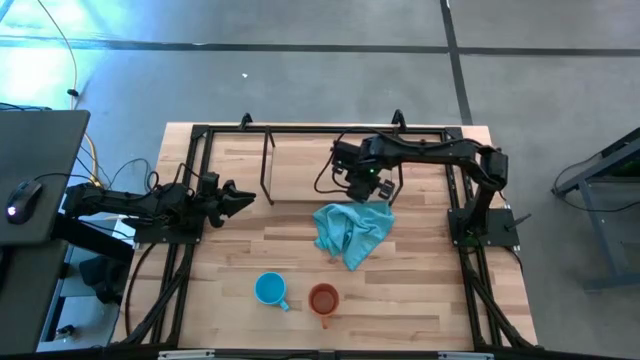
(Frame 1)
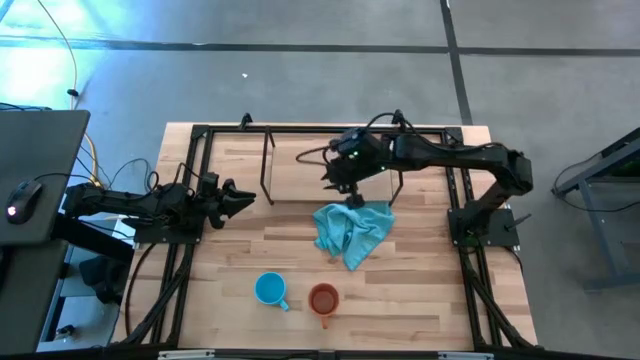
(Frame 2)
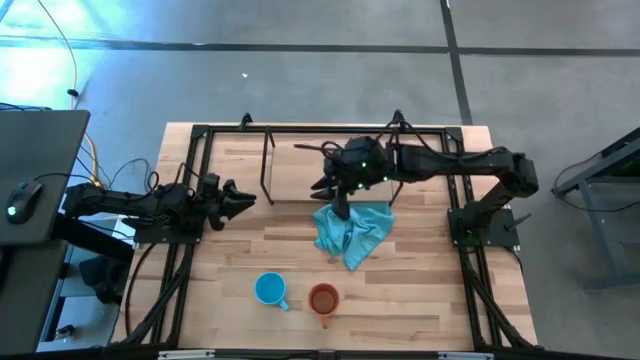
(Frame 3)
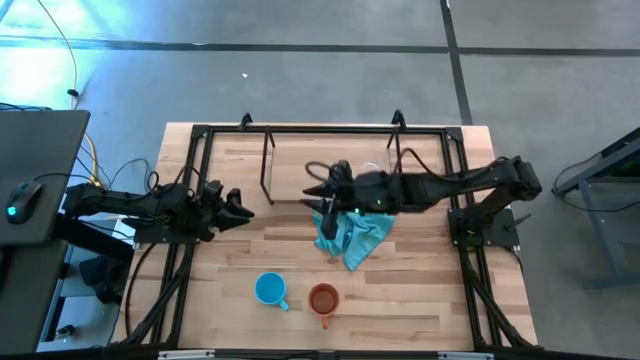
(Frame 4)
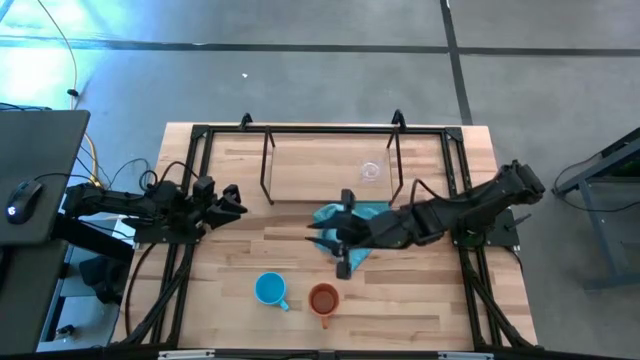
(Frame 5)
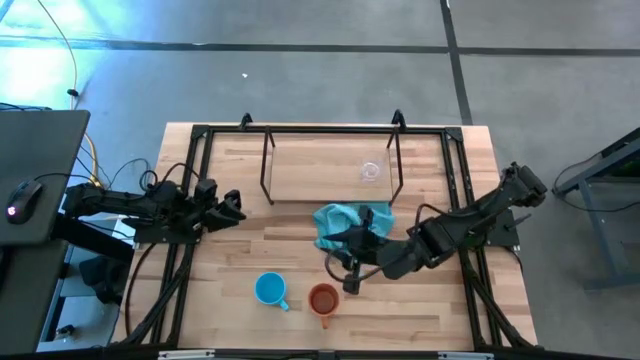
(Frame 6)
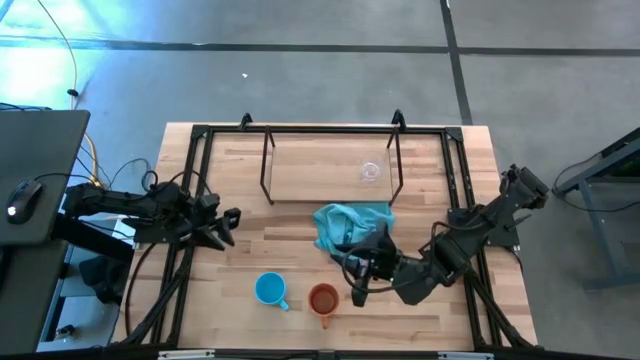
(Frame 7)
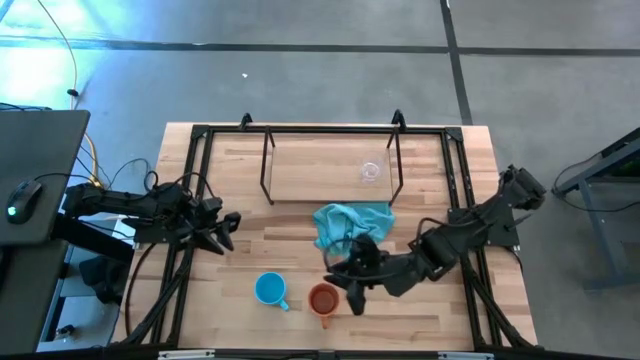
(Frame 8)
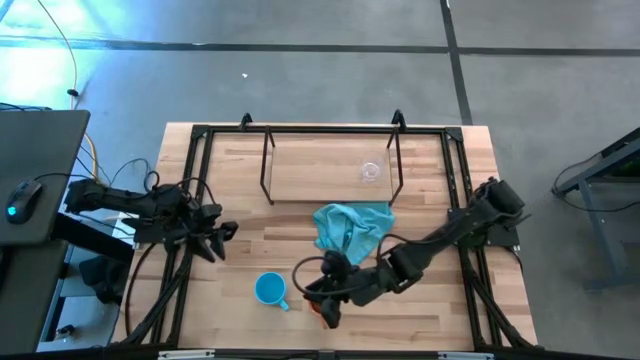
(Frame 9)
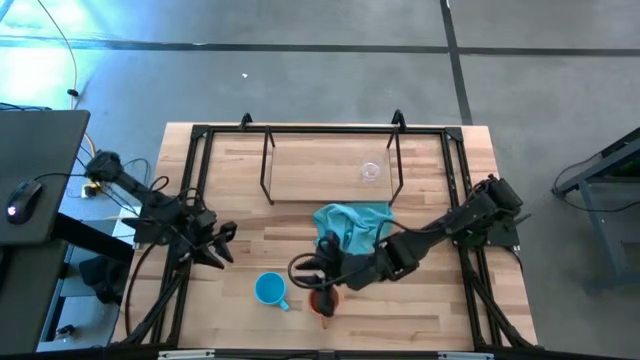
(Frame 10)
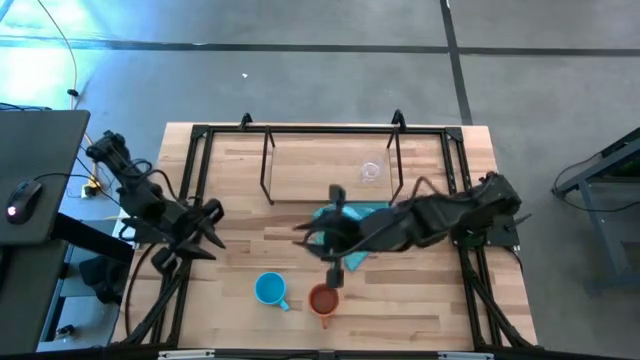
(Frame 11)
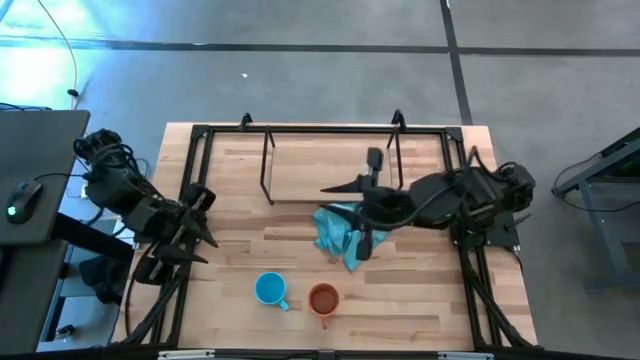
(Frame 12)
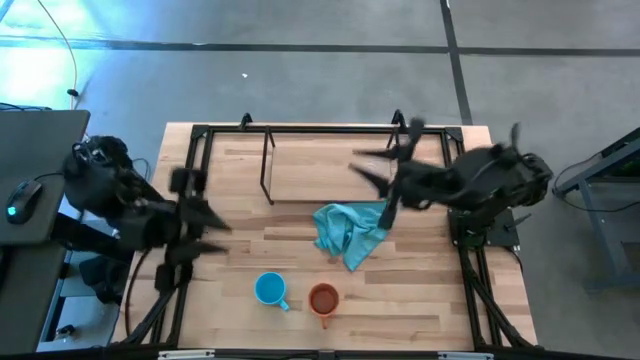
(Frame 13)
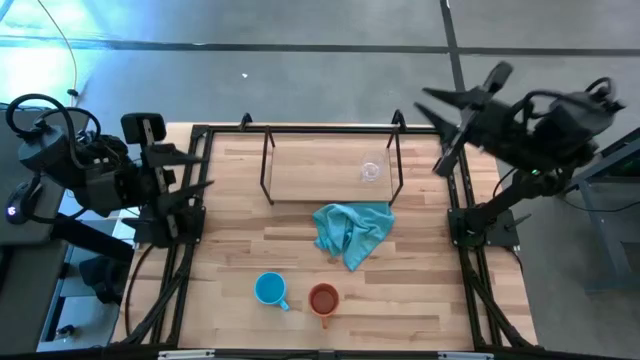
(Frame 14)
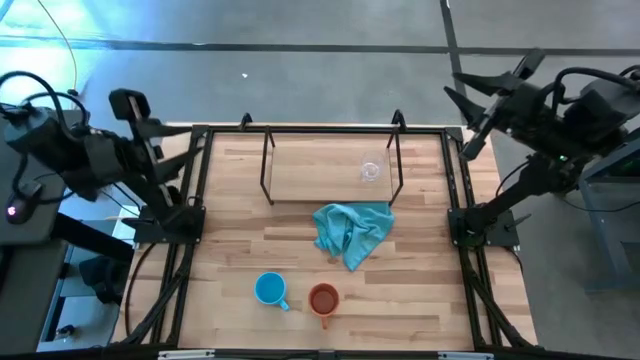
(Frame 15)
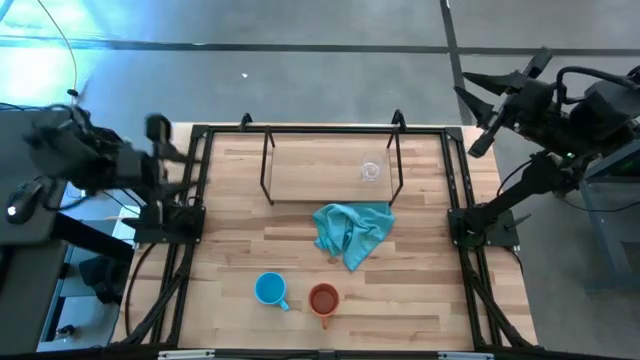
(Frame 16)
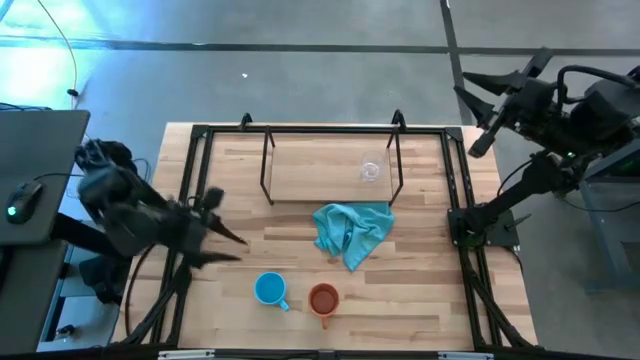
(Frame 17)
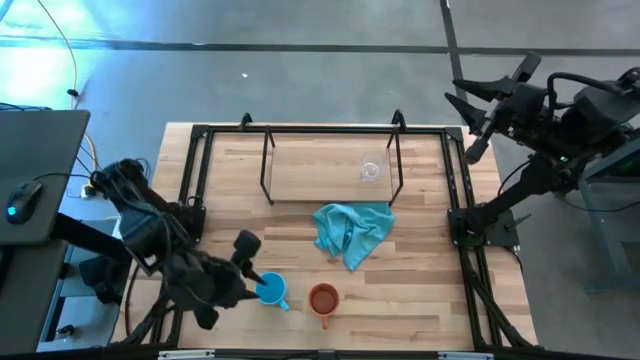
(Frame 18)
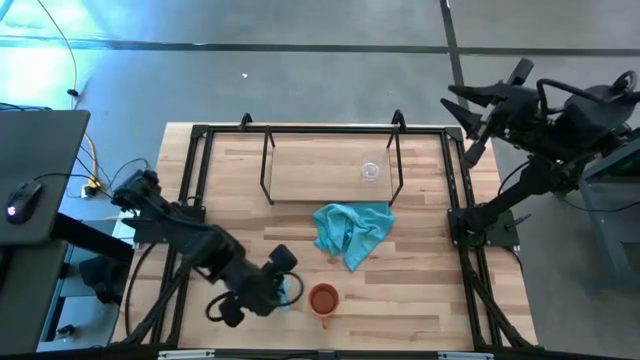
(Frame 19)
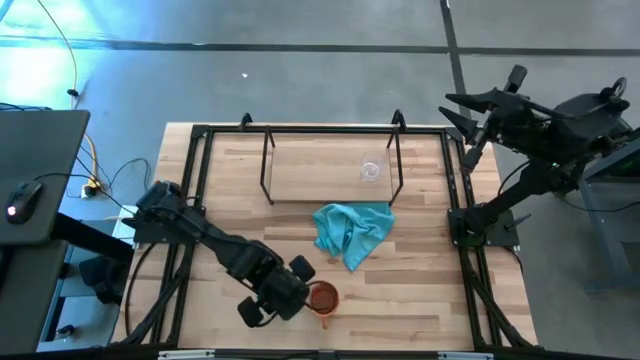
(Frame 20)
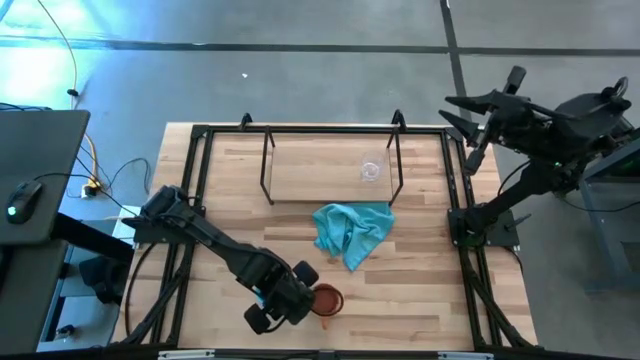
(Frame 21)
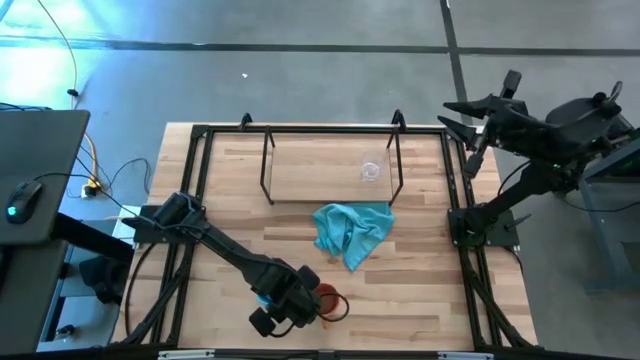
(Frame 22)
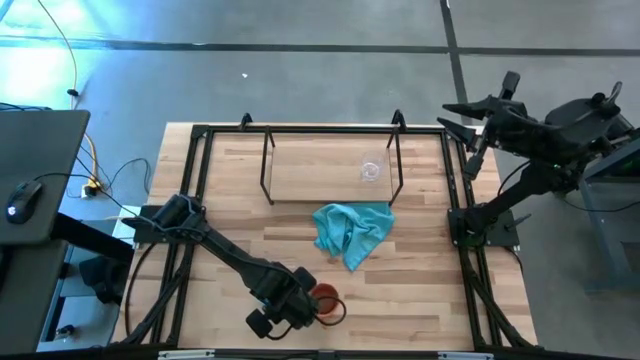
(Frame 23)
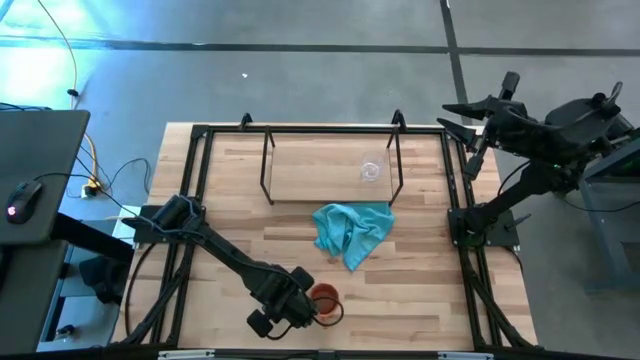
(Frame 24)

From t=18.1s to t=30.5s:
Task: Stack small to large cups/mugs on shelf
Put the blue mug on the shelf

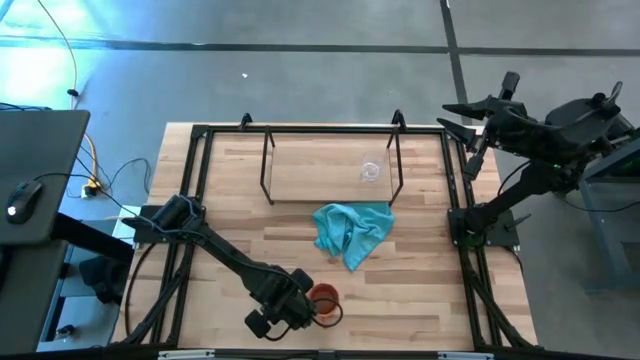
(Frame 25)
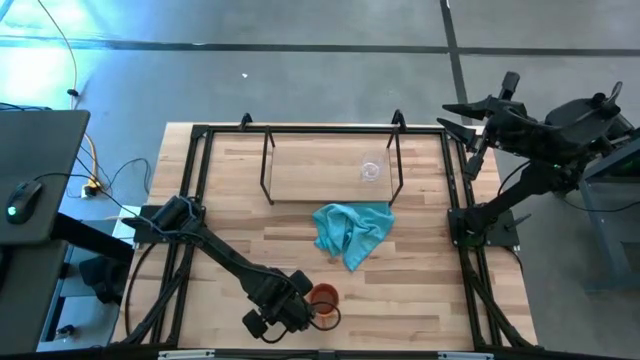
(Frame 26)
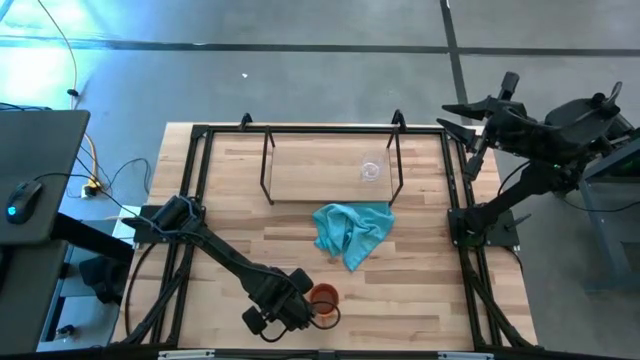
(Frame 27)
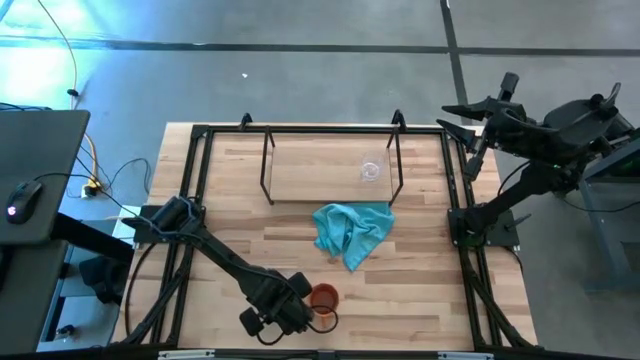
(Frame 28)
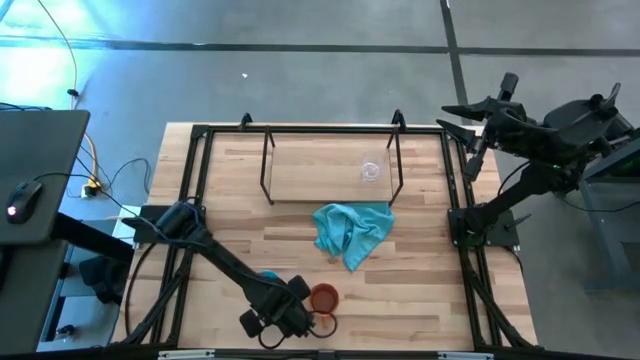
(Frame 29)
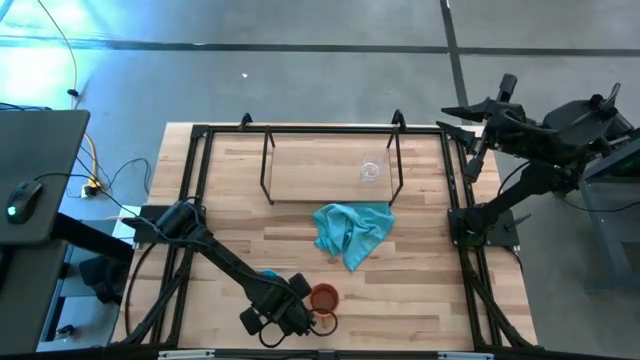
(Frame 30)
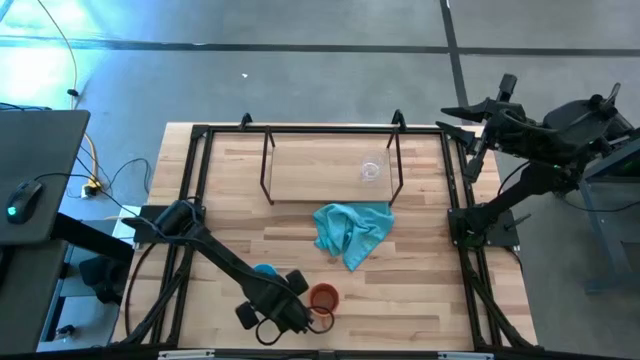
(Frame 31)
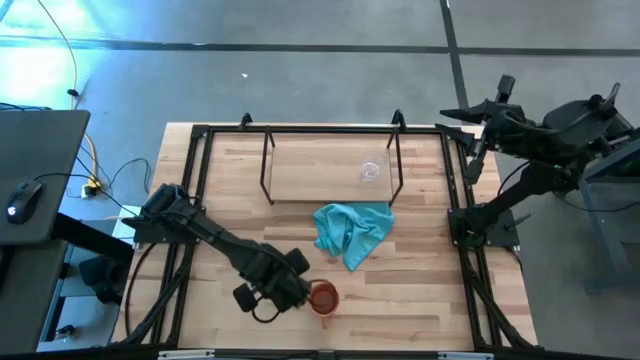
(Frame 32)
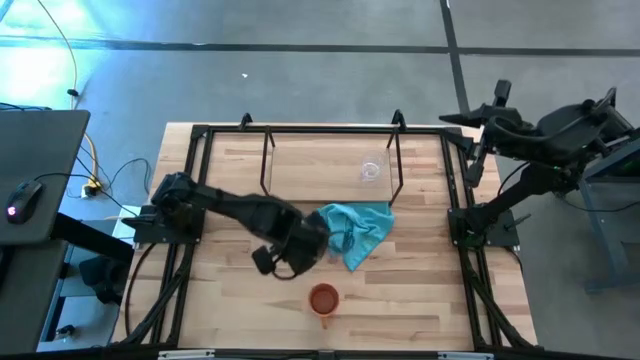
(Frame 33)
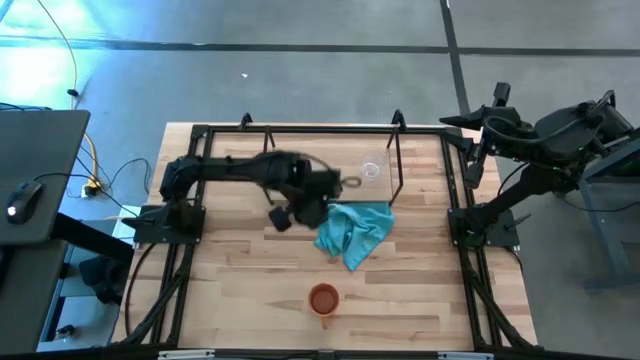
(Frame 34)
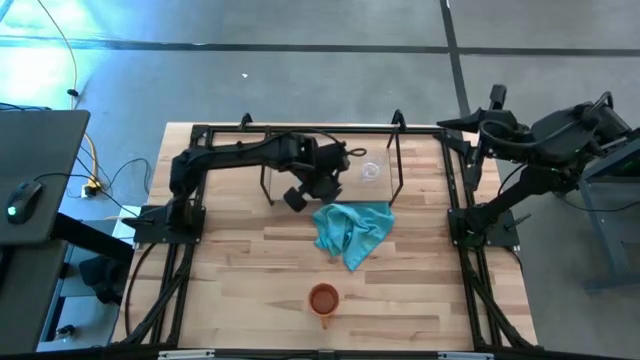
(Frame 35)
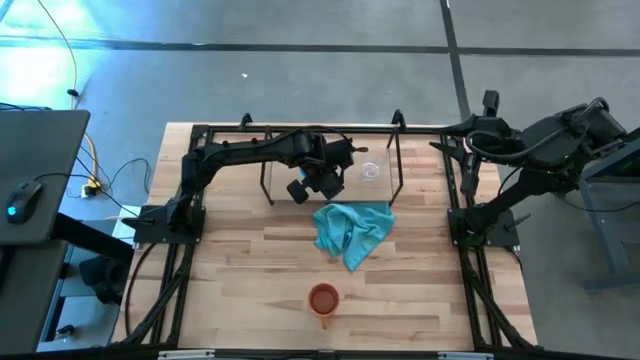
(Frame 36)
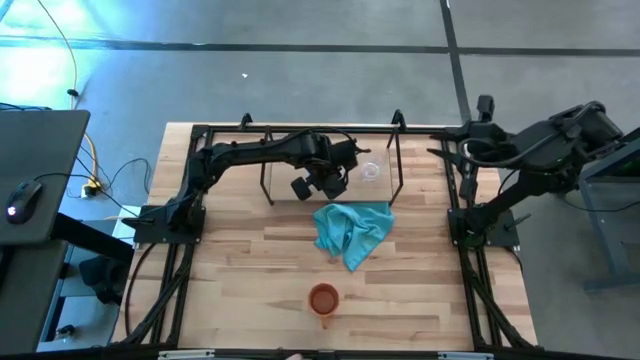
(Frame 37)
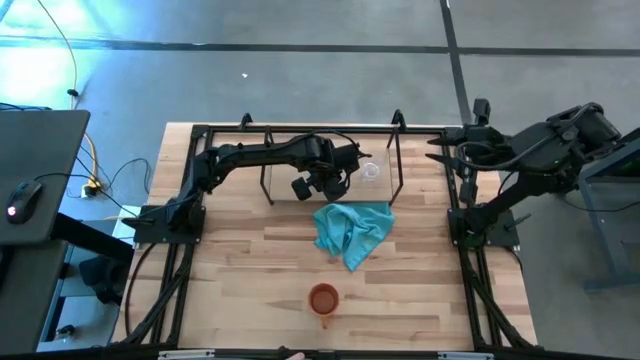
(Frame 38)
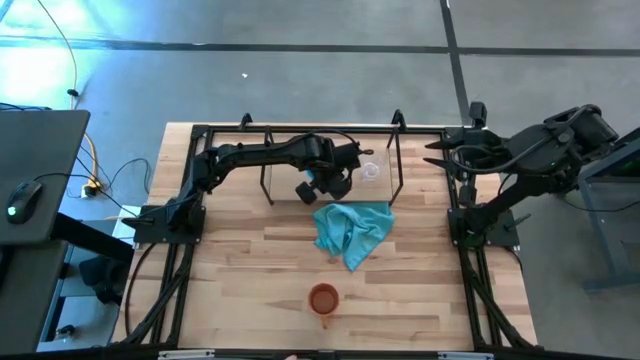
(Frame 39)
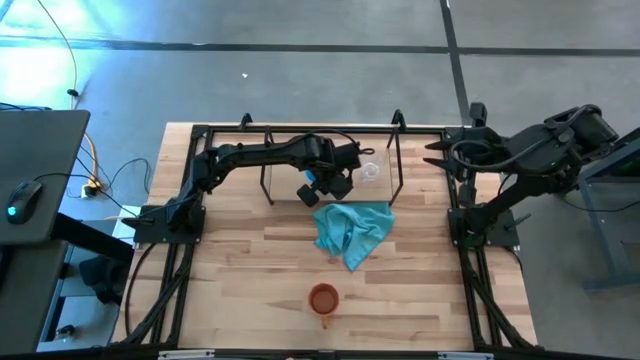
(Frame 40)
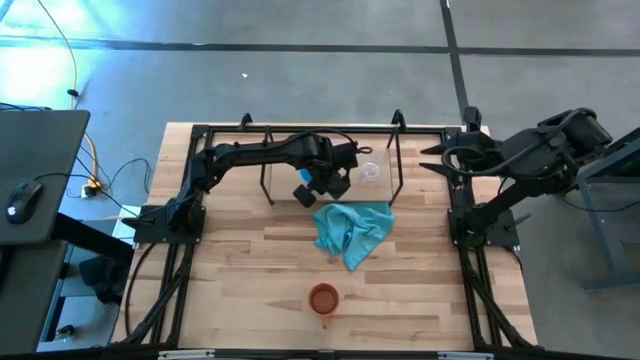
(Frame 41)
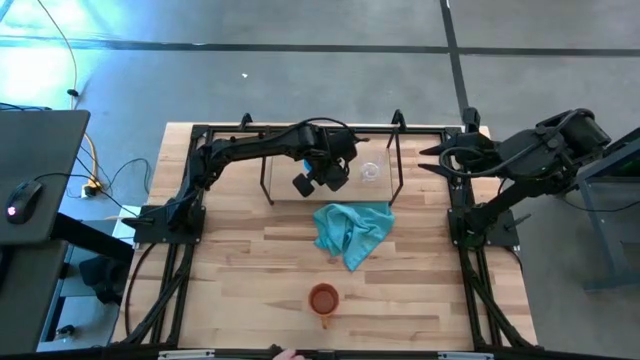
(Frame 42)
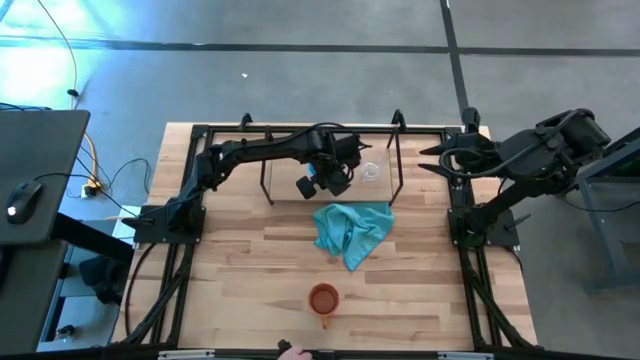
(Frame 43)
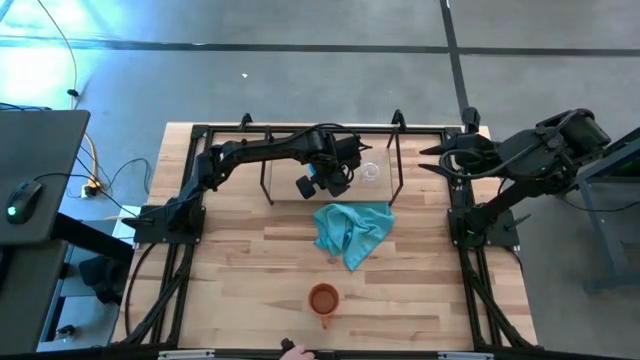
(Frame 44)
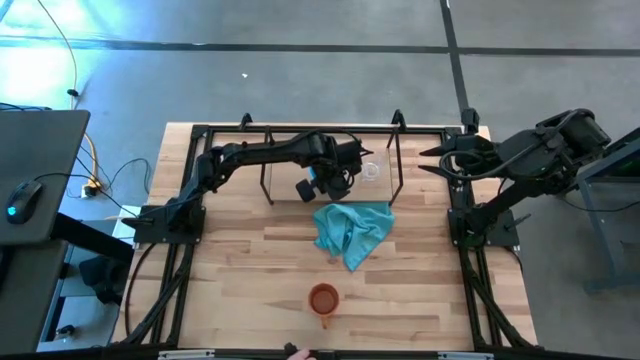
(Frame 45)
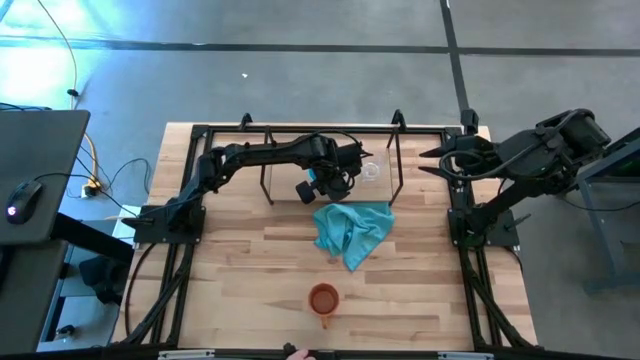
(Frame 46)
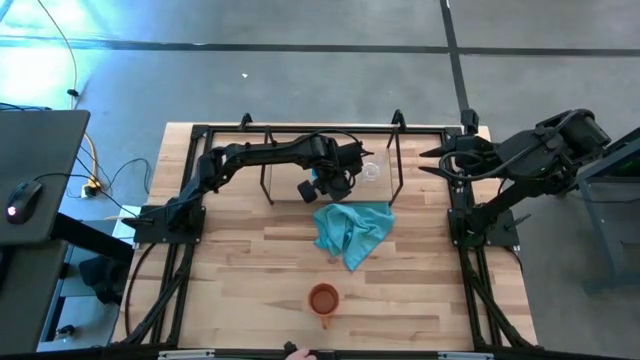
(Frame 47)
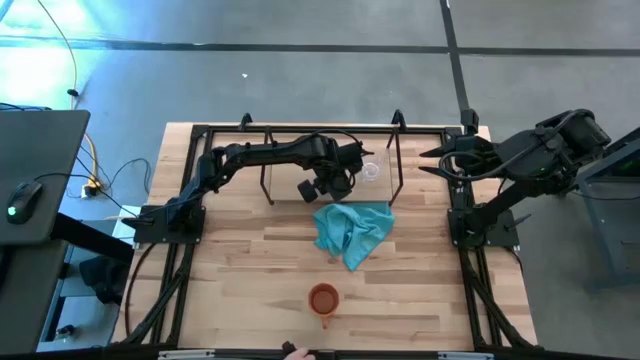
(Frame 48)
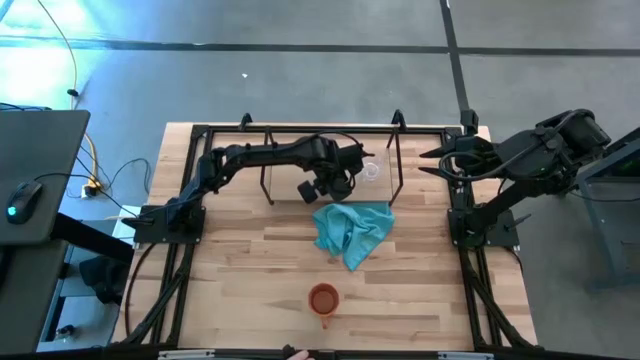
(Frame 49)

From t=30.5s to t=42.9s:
Put the blue mug on the shelf
